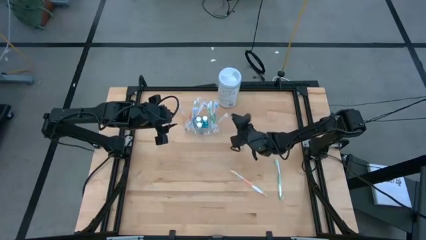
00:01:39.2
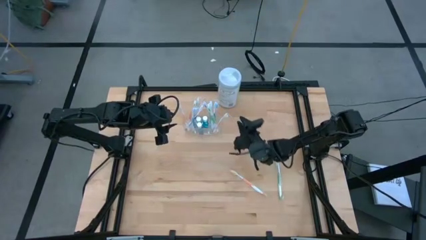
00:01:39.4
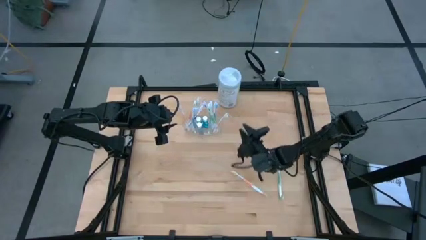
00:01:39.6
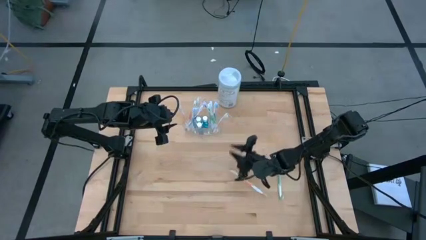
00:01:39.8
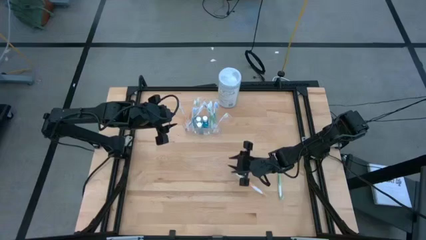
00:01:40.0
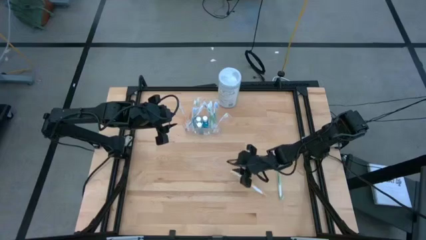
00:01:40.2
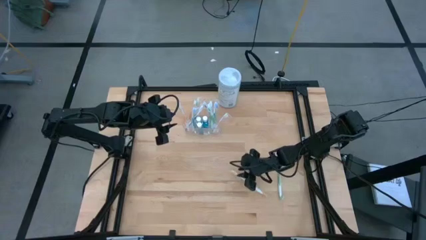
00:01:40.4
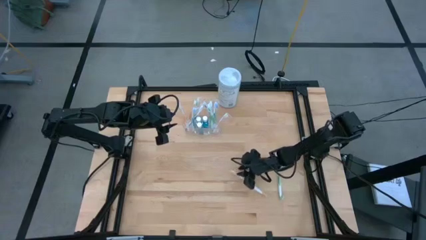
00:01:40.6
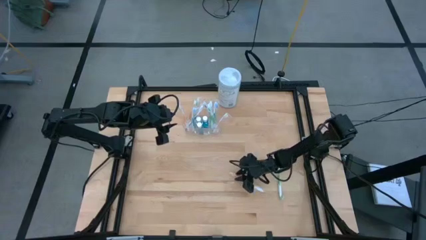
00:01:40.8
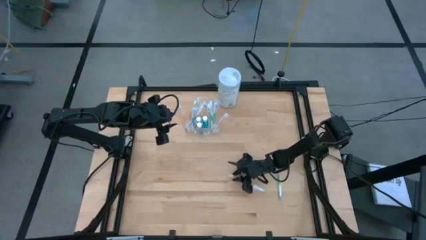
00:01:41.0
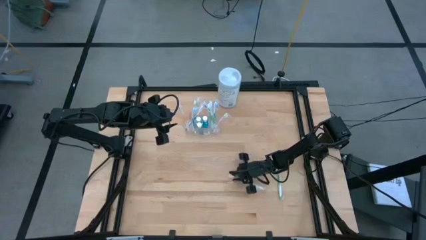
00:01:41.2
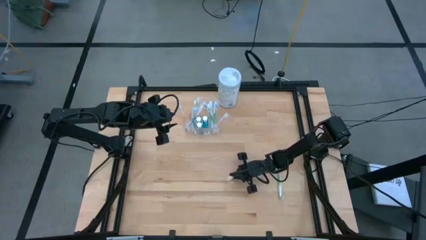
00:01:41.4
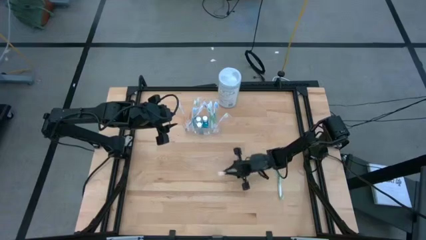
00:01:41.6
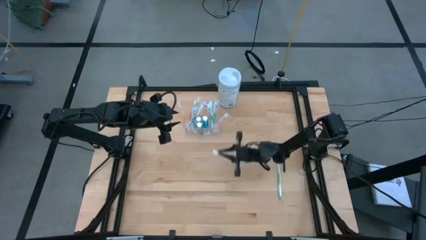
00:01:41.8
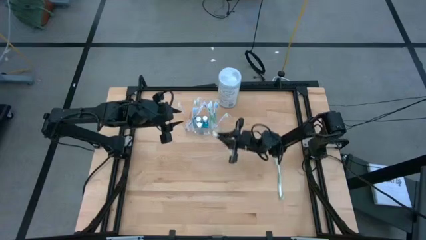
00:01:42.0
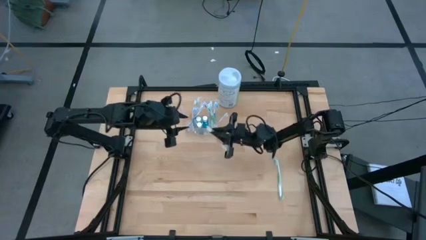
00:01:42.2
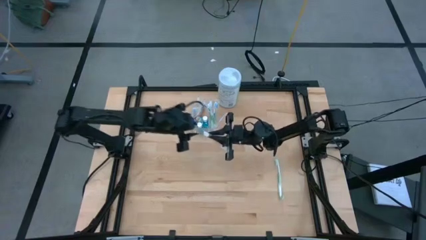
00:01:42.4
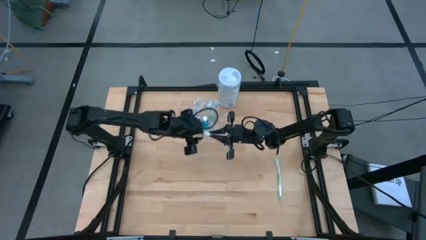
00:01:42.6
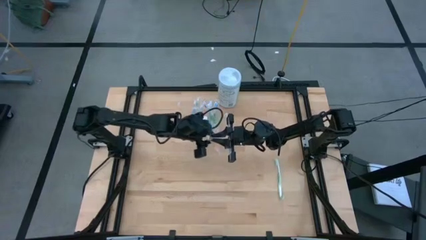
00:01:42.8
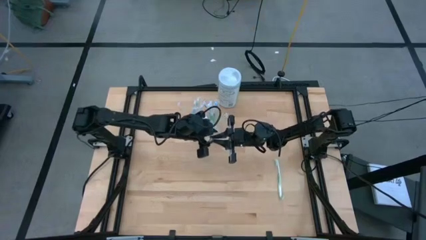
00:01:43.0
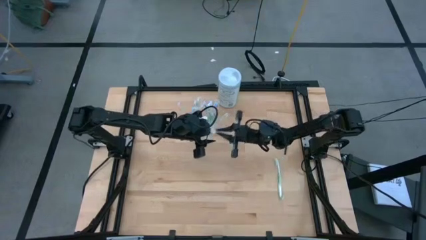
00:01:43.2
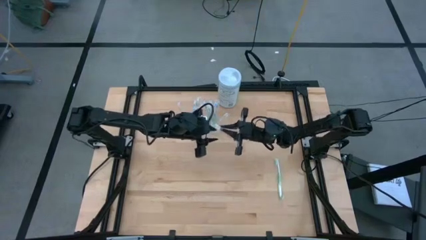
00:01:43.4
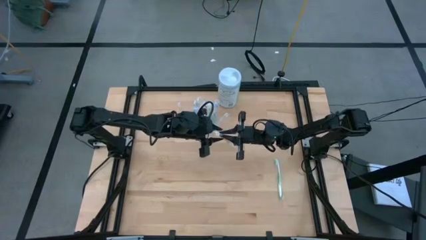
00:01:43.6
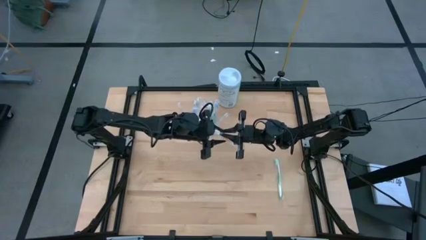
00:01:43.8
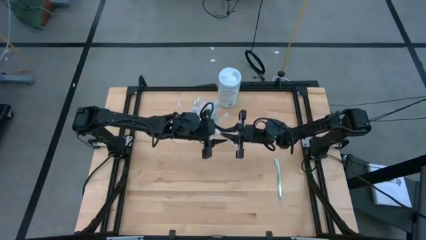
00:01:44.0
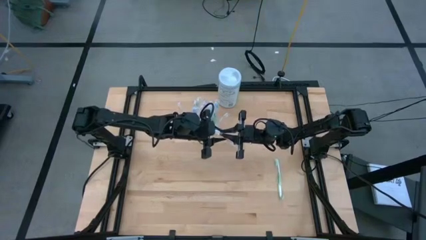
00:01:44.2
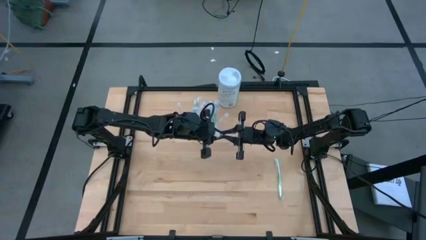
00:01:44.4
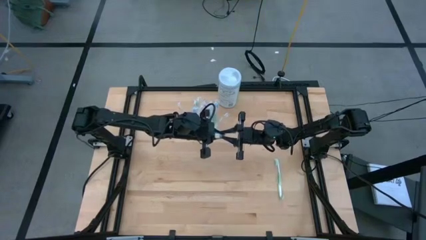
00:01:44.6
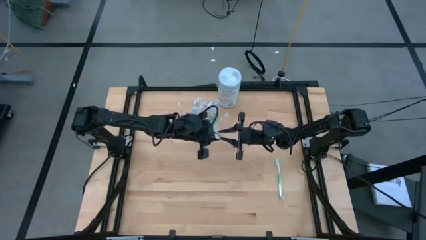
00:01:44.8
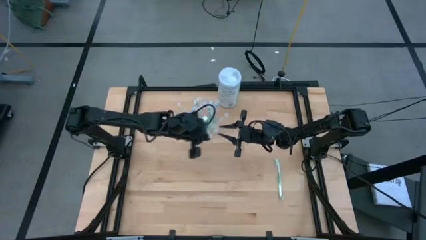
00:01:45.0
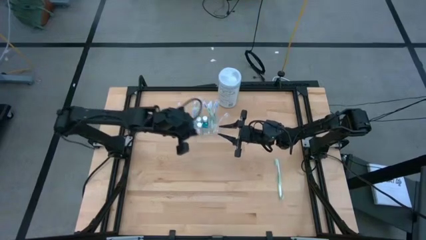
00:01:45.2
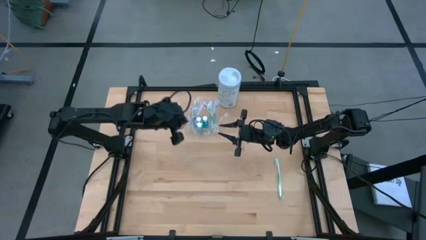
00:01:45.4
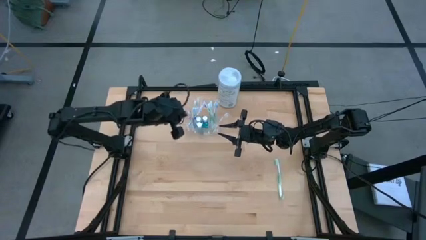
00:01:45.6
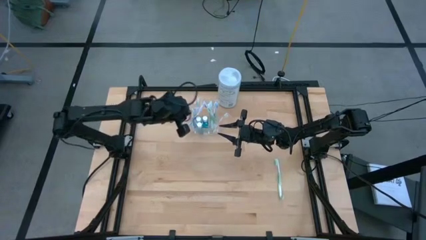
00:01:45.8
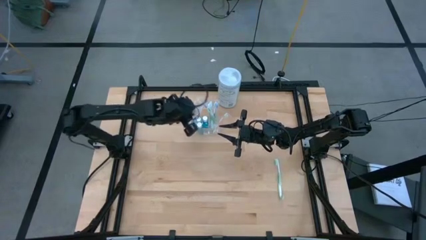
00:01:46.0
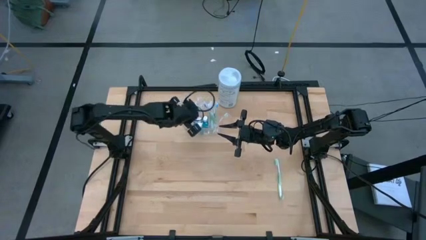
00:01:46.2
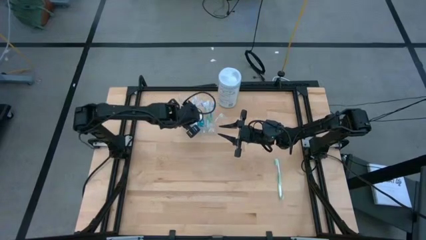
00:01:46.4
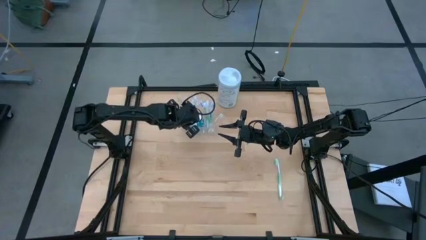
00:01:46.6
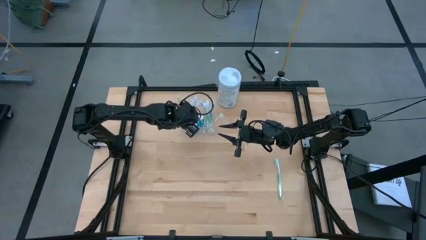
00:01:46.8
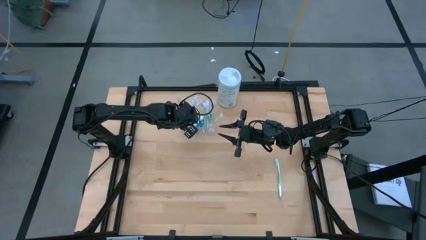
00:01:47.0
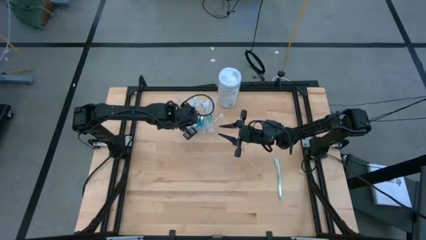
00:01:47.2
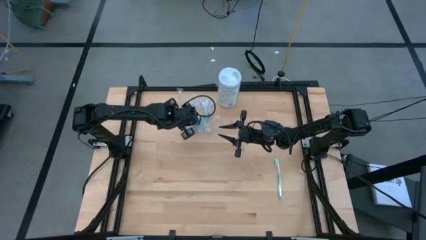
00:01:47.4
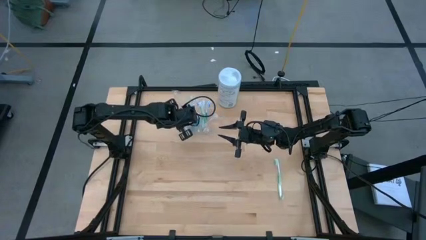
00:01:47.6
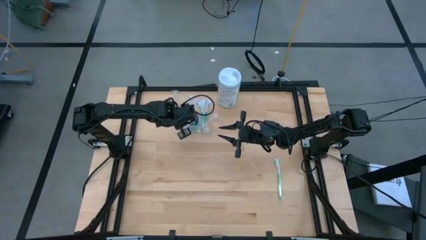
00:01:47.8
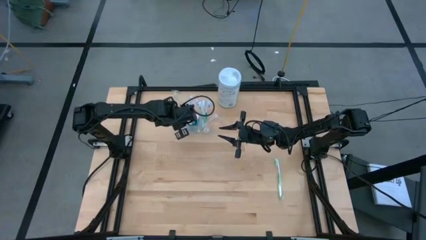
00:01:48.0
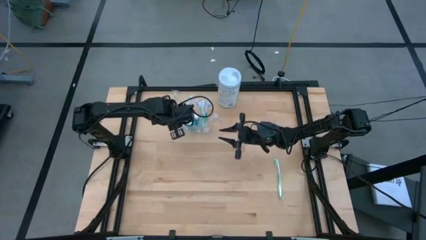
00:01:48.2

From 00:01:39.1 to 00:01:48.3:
Task: Pick & Place toothbrushing station
Put the orange toothbrush into the transparent organizer

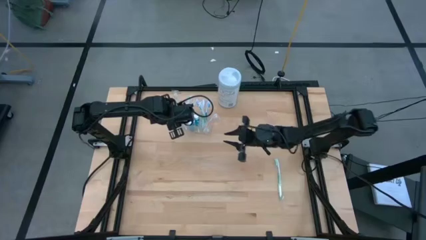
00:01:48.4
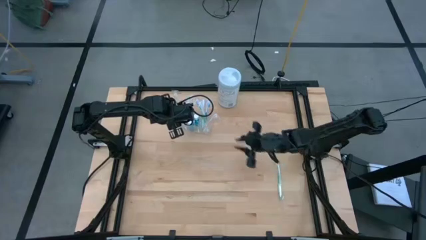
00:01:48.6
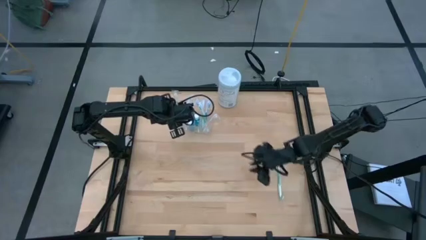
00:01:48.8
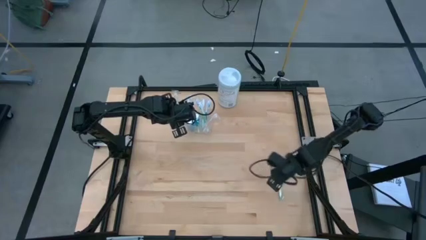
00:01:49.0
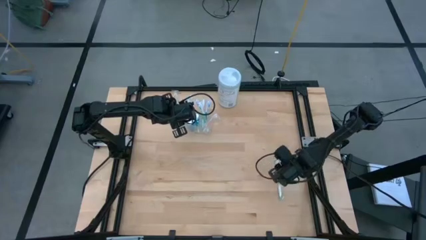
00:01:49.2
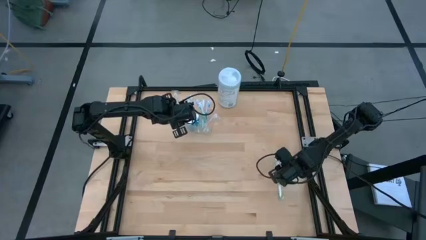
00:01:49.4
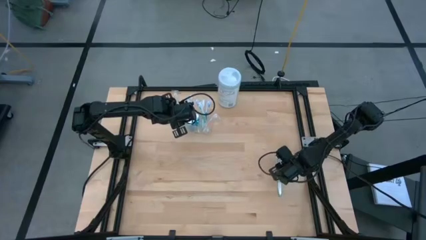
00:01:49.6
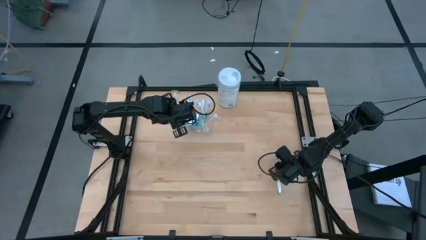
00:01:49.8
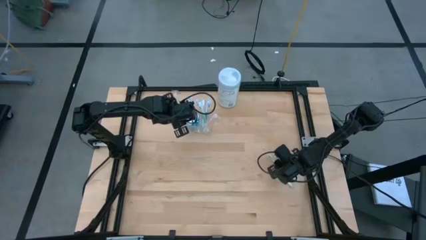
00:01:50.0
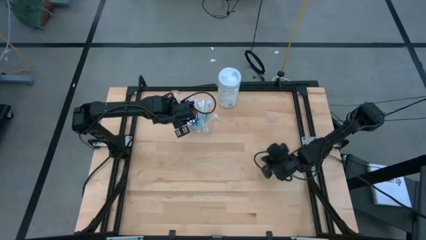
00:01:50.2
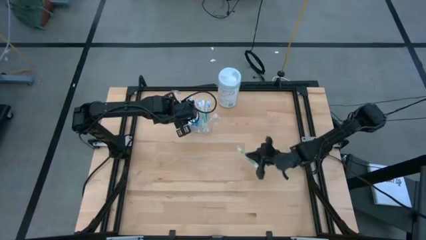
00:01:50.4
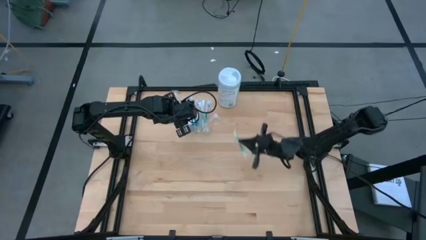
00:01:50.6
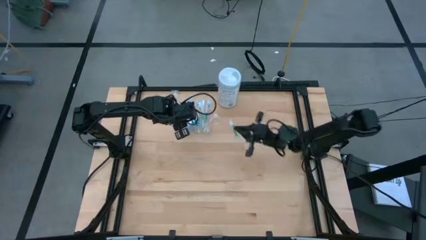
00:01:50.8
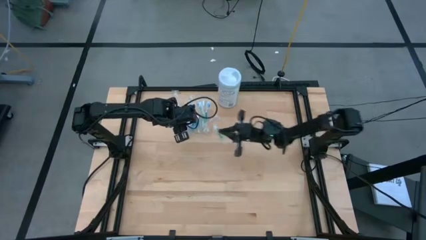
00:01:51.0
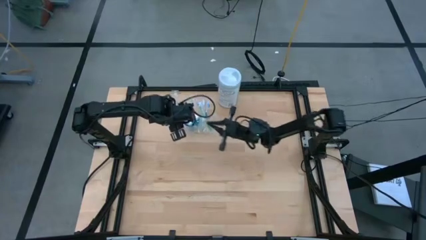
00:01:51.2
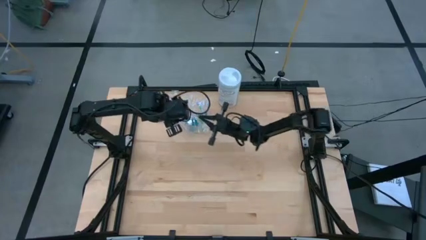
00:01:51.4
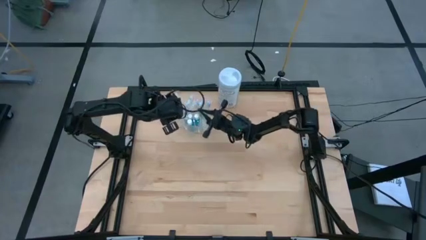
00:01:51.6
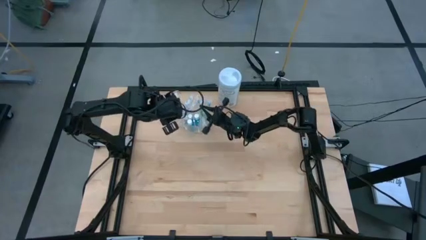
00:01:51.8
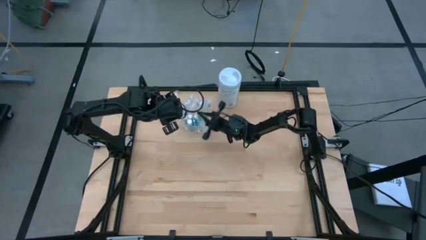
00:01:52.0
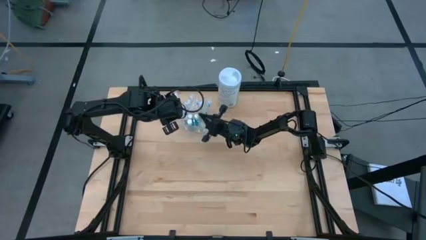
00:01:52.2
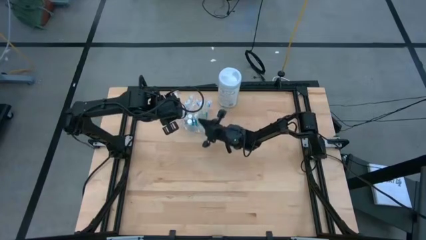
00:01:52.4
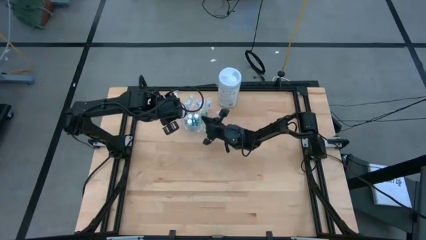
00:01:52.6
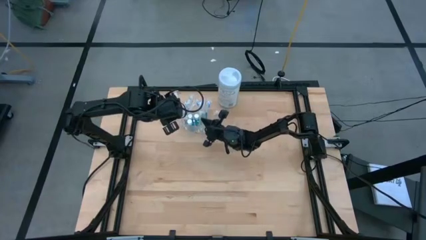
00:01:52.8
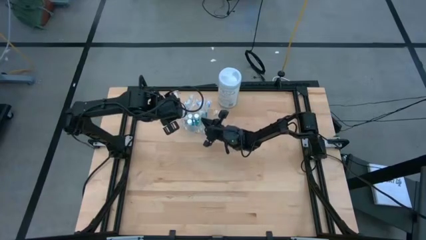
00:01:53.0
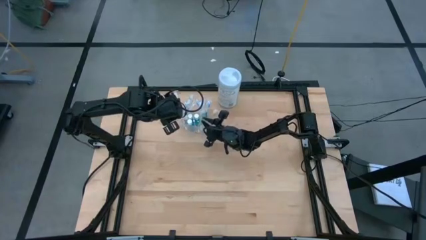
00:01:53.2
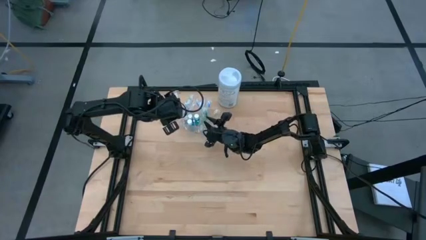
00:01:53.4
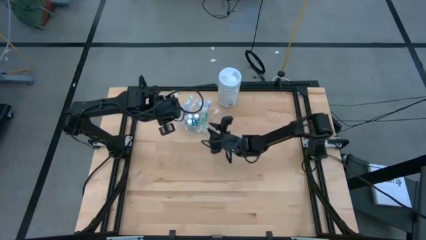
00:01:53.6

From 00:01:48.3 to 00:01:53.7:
Put the green toothbrush into the transparent organizer

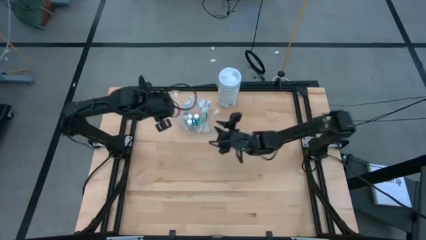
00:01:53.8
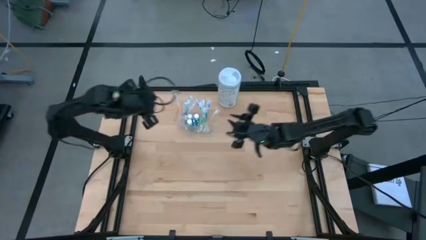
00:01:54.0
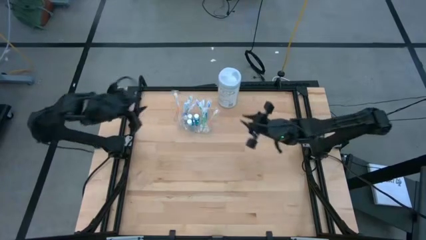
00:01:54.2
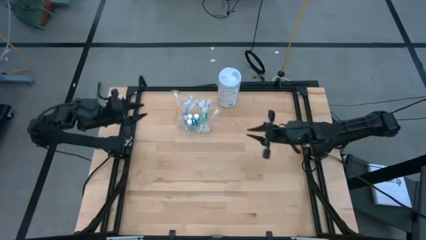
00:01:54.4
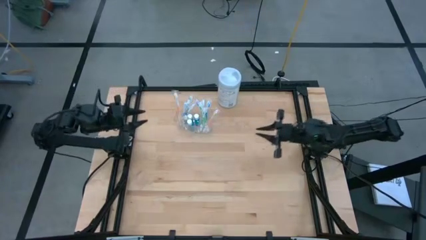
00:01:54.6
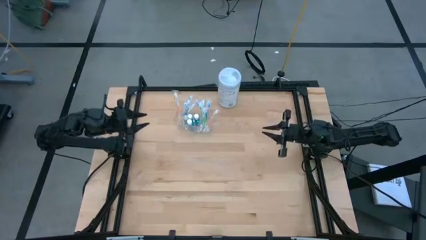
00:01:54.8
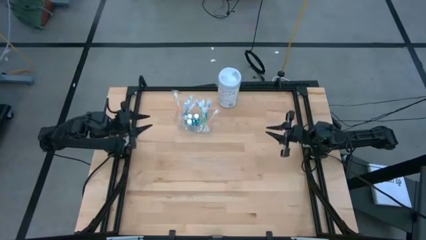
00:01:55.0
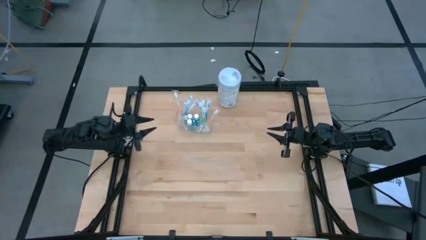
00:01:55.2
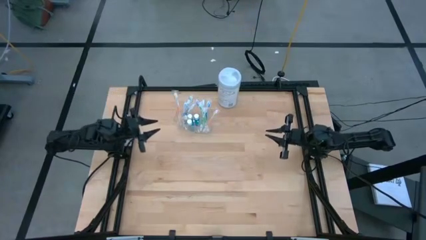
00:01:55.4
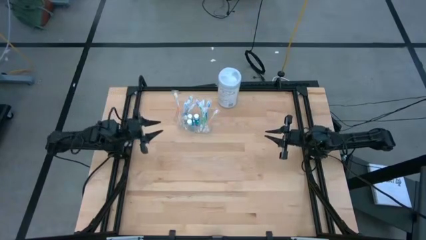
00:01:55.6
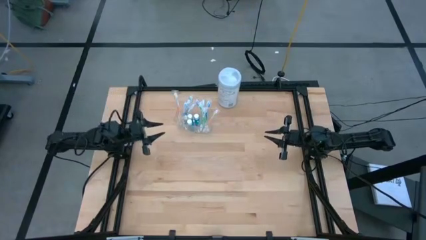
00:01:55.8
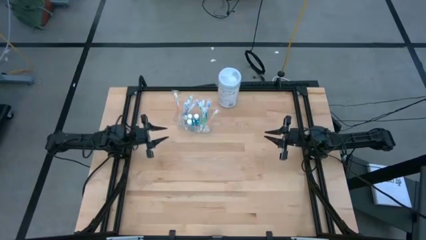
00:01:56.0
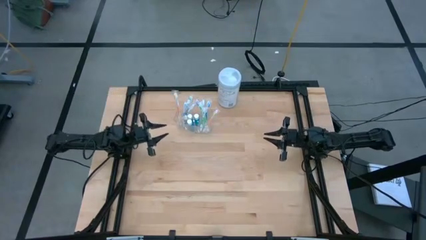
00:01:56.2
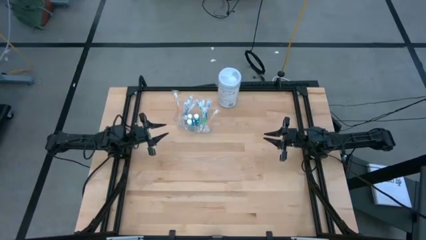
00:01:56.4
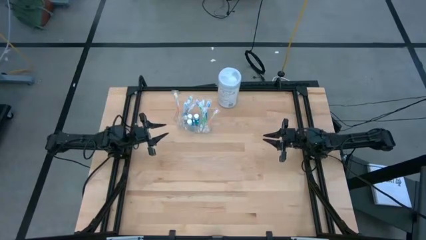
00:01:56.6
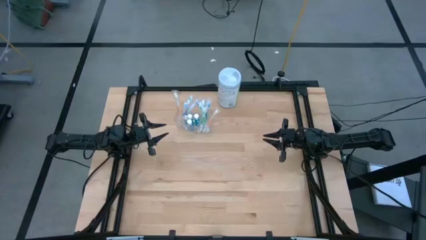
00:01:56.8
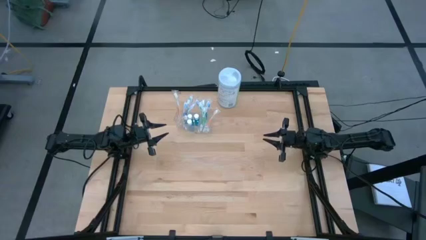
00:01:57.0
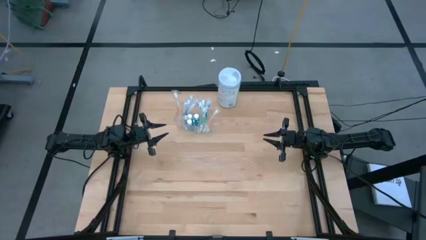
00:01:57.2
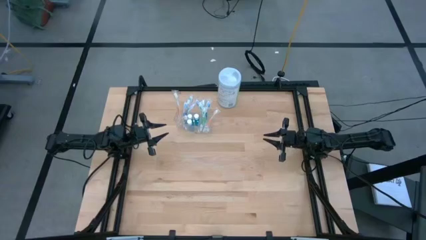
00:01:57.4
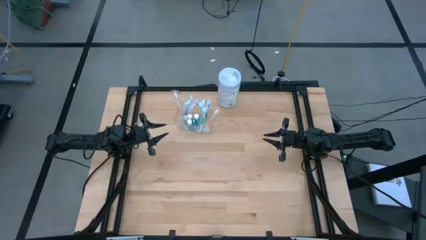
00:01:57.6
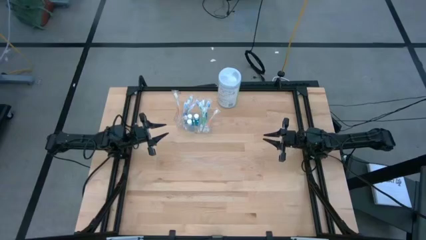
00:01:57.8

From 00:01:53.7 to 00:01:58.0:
Return to Home Position
